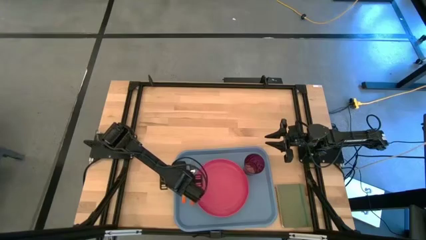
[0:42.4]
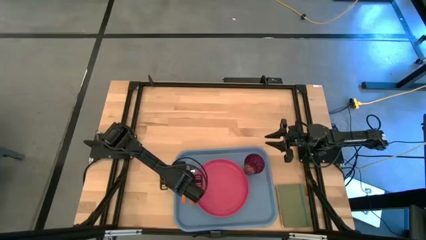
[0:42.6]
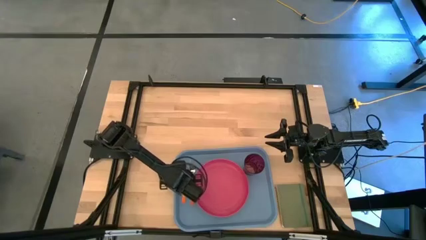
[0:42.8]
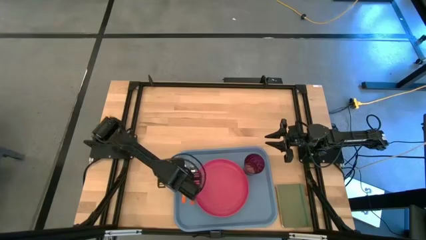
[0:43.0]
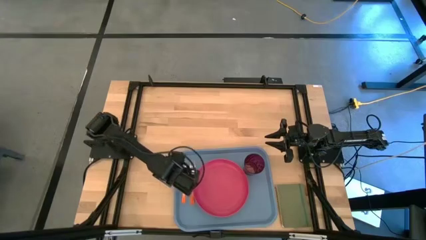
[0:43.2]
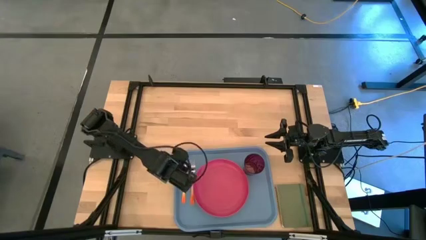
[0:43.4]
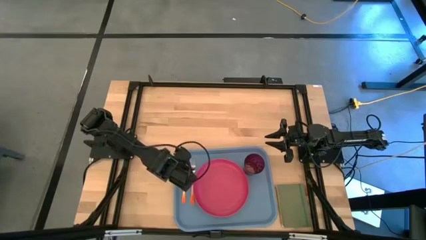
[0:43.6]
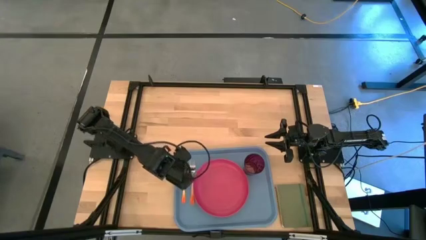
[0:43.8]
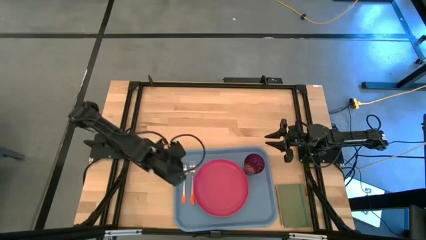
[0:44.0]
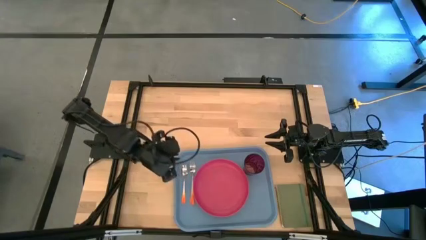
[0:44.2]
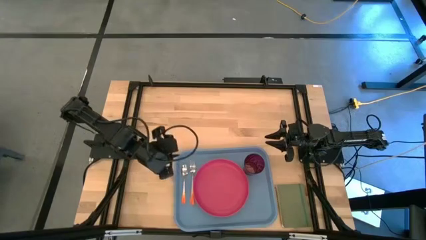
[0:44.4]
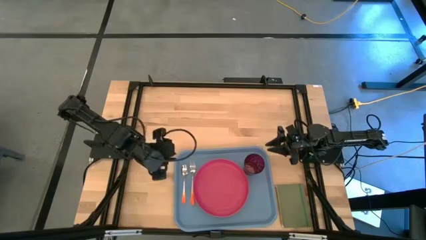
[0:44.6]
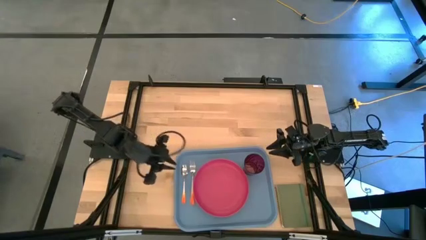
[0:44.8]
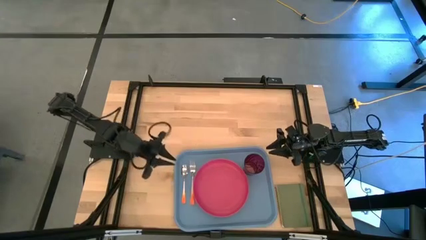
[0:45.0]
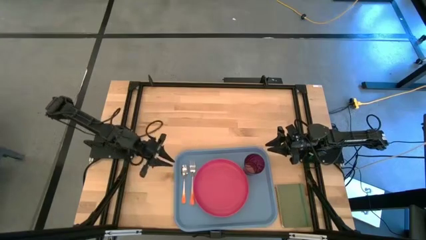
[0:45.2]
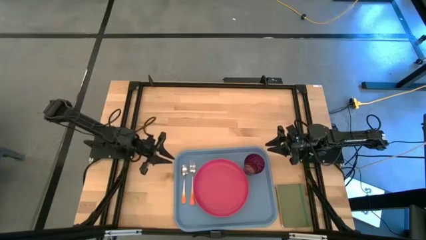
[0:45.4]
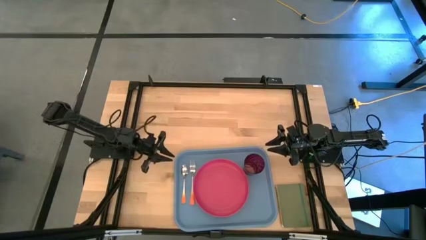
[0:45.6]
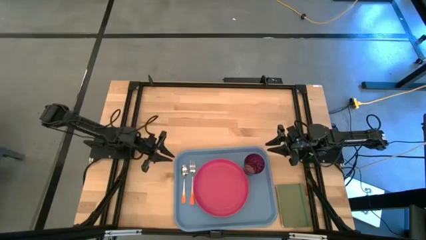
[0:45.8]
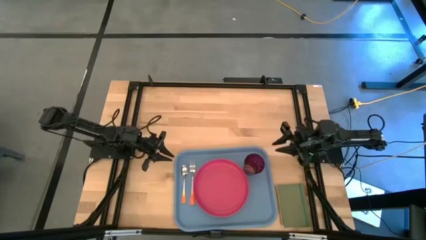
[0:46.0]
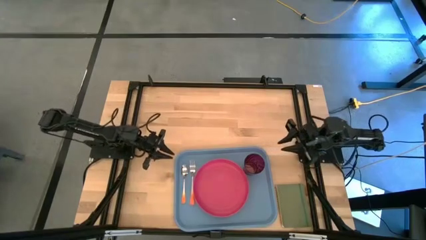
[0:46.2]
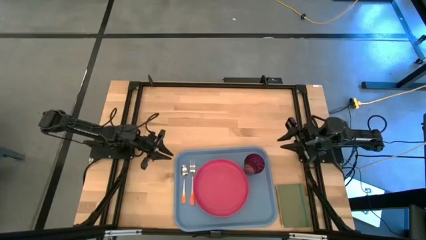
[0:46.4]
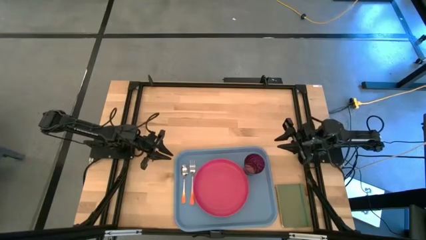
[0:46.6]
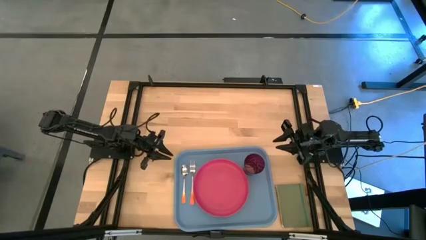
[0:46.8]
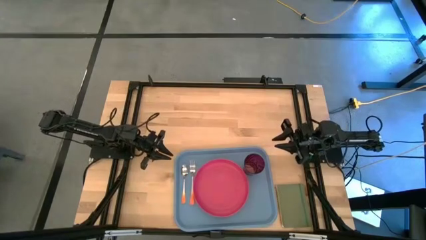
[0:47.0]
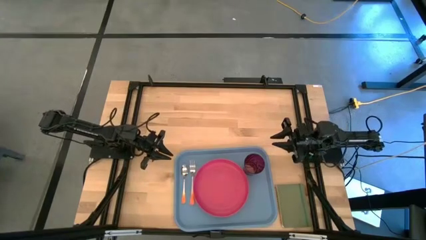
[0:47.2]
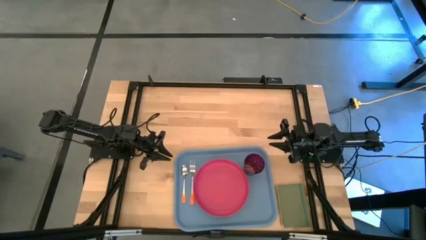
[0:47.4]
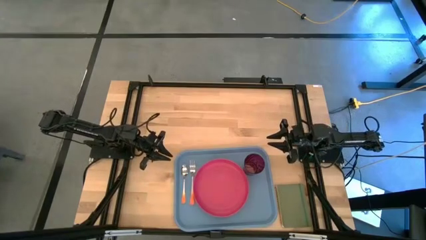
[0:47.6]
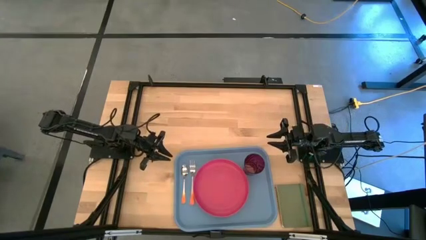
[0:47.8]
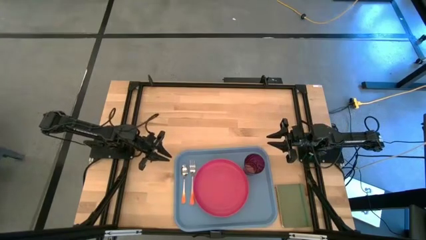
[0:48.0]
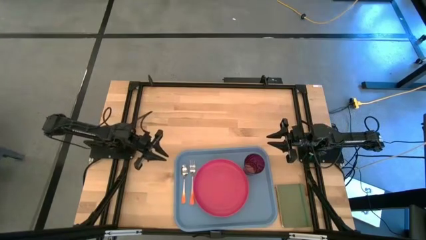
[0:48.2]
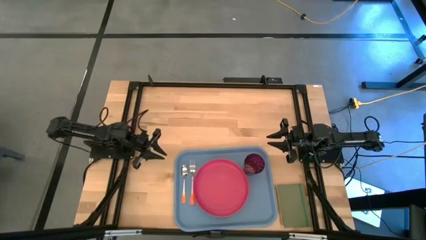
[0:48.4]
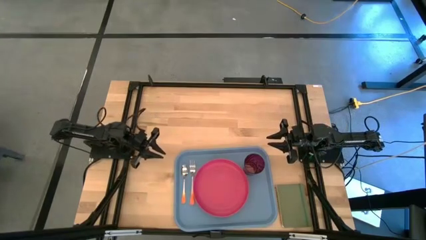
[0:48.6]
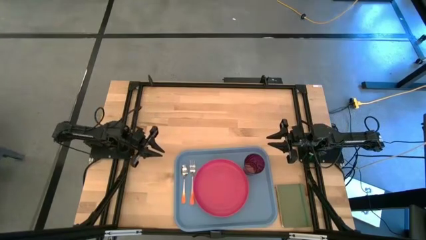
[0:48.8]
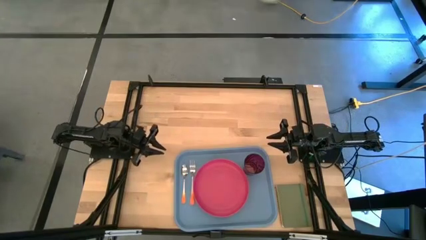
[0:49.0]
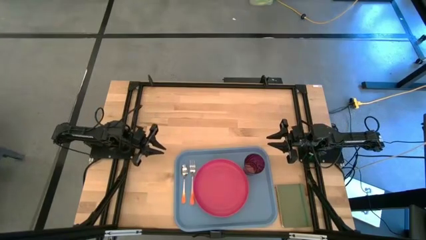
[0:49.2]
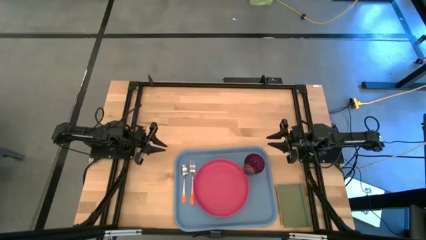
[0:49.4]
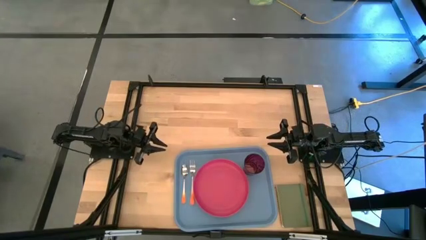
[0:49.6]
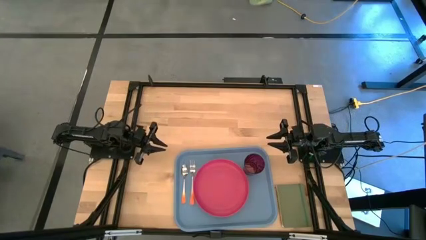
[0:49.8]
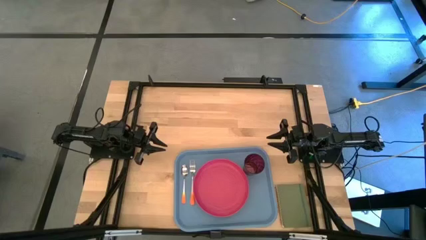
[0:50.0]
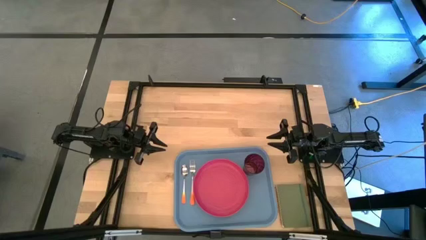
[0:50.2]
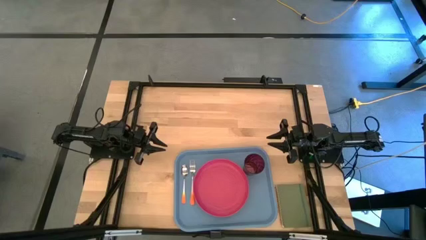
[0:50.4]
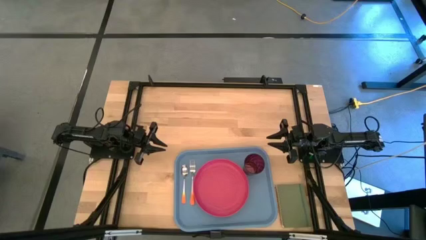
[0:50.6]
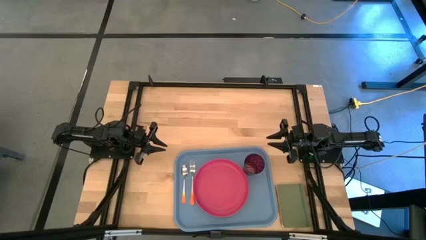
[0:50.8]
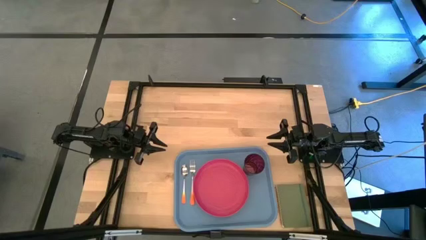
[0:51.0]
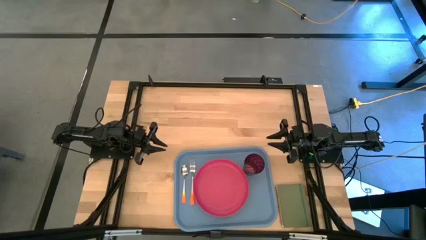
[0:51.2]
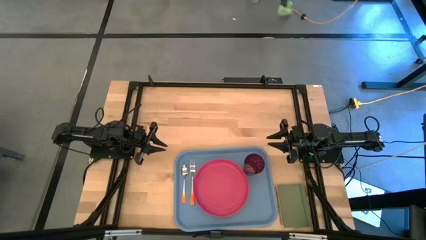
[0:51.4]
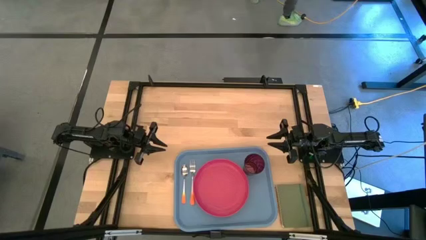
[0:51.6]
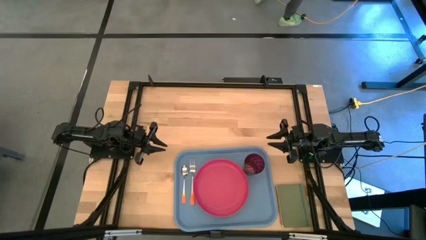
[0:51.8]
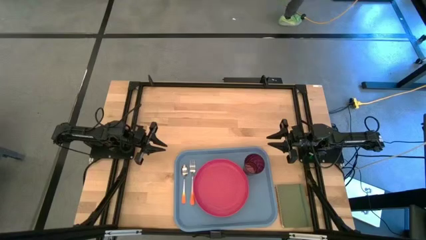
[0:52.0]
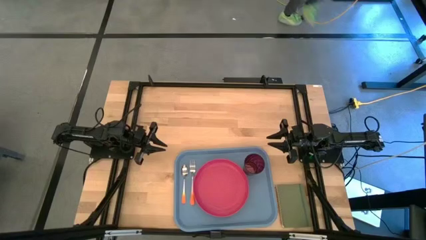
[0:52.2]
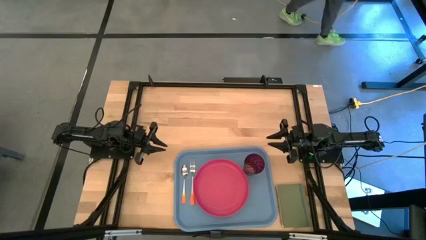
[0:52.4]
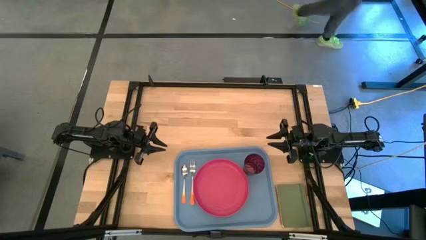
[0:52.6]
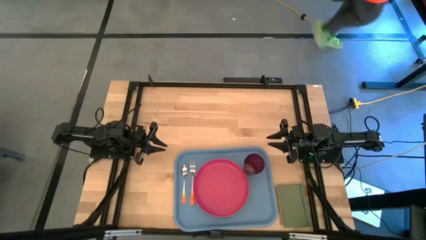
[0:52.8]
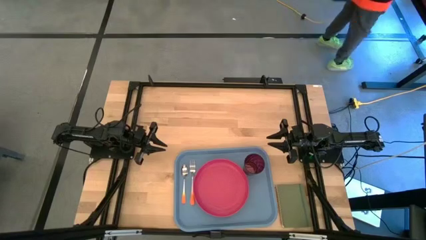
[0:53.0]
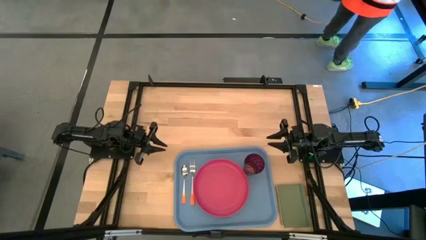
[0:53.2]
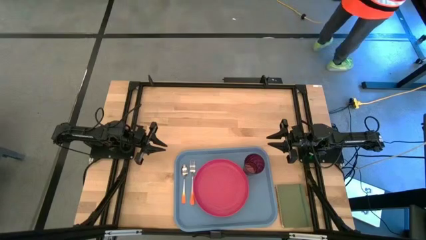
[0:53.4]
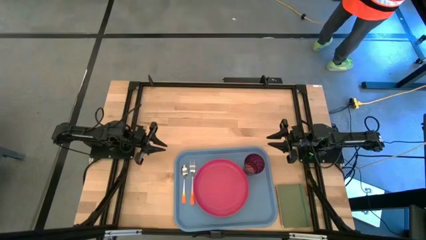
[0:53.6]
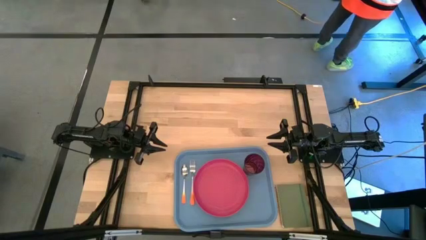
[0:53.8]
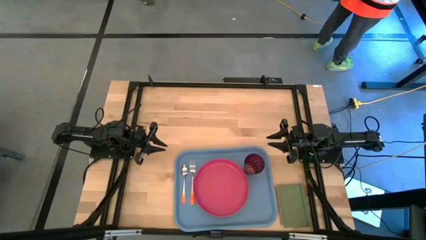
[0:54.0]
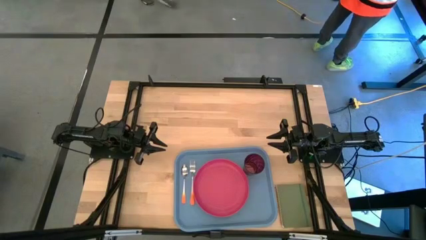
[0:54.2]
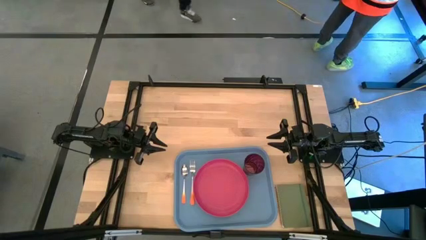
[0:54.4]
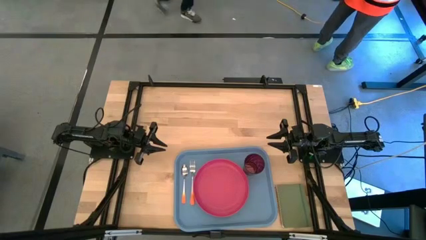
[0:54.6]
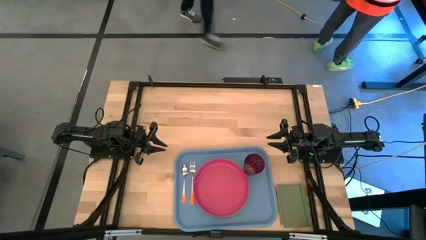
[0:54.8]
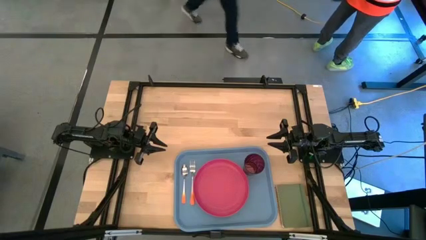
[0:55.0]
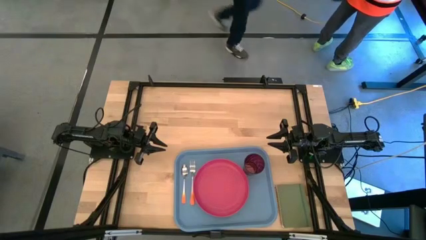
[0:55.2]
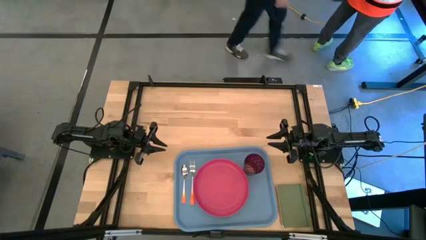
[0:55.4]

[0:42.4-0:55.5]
Task: Pick and place plate/cup/fork/spoon on tray
Return to Home Position

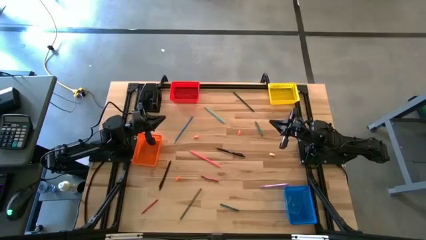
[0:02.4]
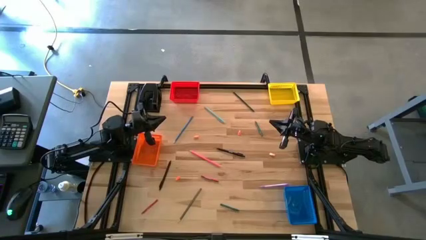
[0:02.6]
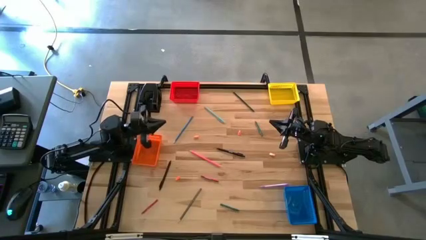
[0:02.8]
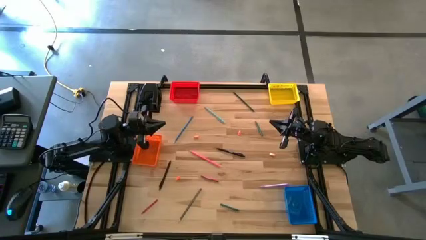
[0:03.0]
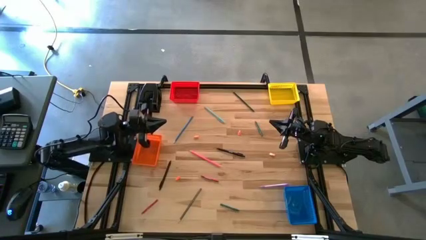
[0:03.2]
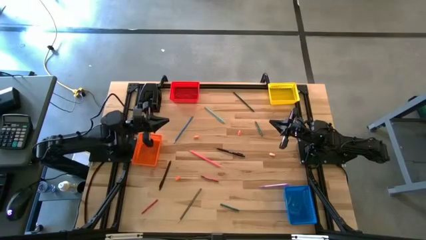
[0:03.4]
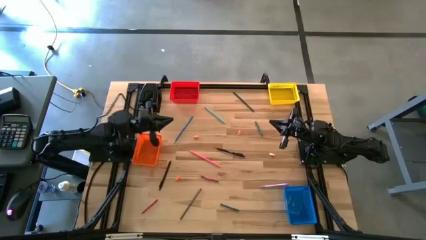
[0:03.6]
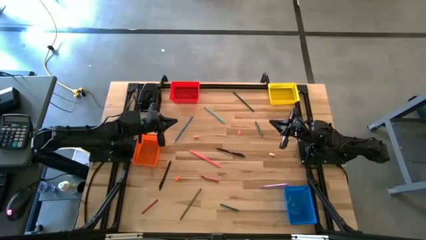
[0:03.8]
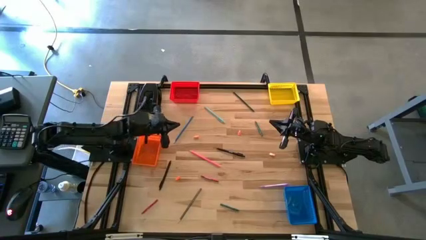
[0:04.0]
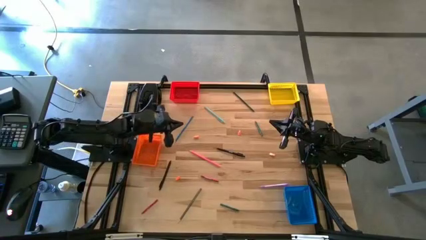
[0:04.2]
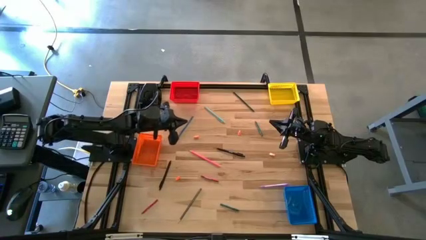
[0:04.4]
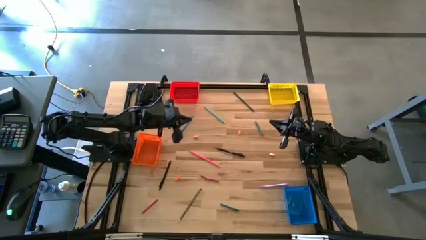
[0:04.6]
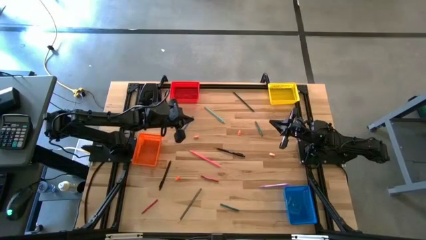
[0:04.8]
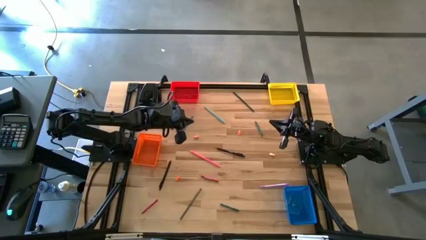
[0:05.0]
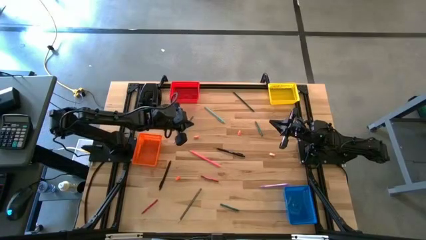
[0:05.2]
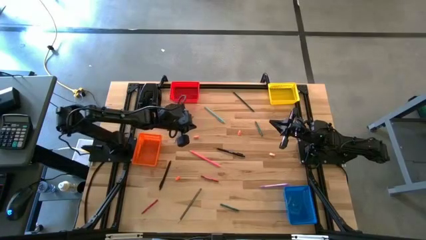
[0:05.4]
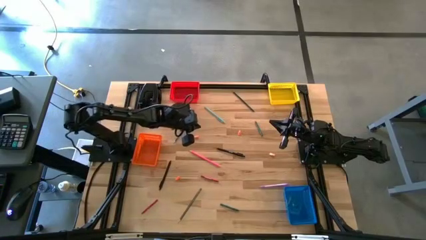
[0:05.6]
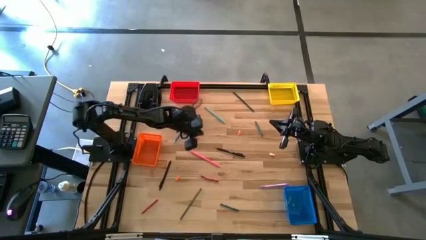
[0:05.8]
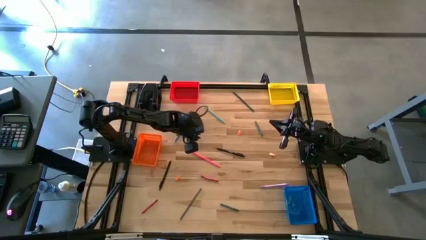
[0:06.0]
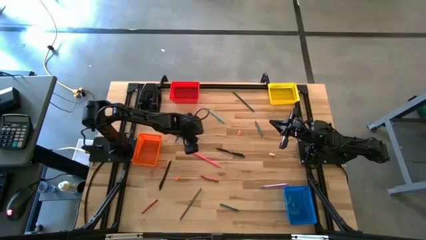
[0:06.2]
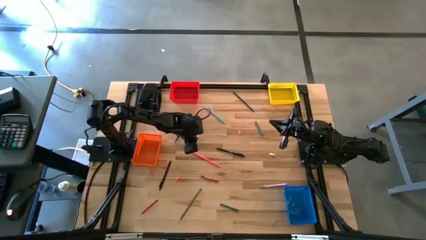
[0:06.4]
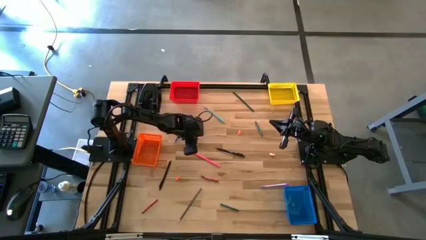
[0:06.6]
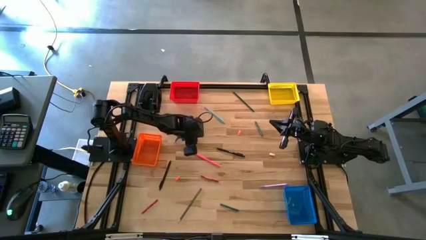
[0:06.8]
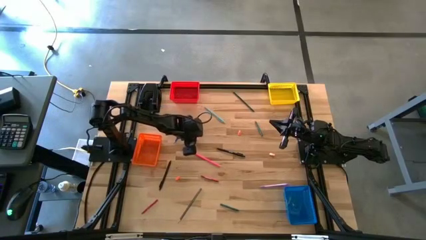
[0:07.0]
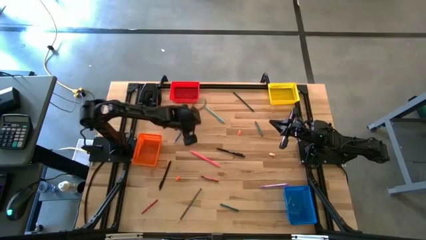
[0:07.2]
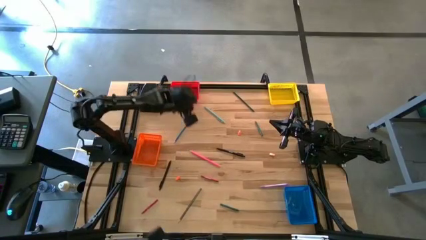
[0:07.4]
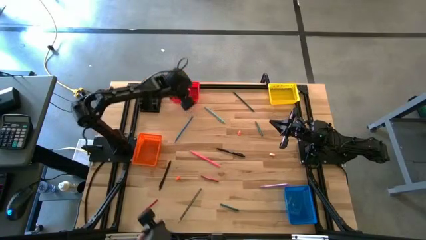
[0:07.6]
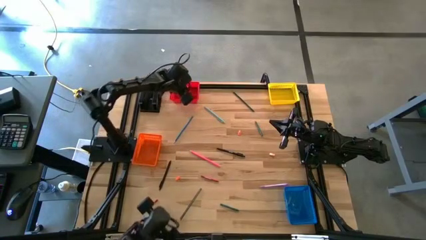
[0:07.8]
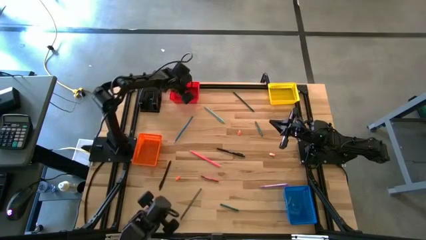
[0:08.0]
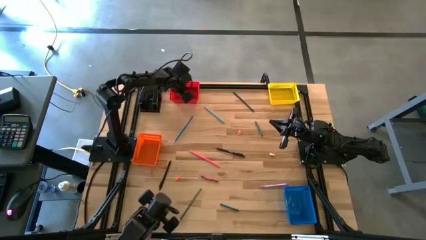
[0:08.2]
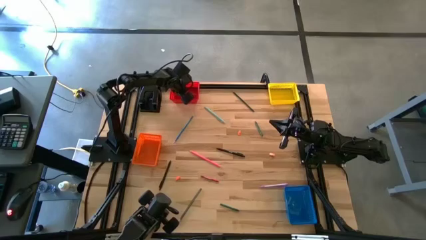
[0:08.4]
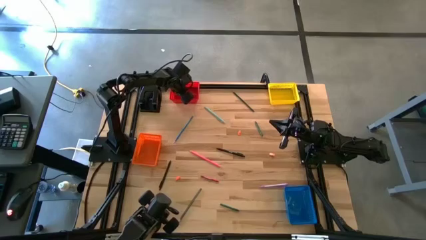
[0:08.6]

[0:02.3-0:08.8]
Task: Sort crayons/erasers/pens/pencils in bins
Put the orange pencil eraser into the red basket
